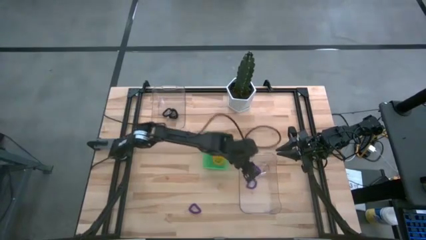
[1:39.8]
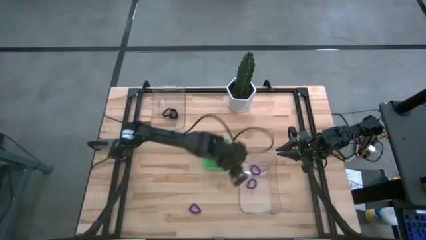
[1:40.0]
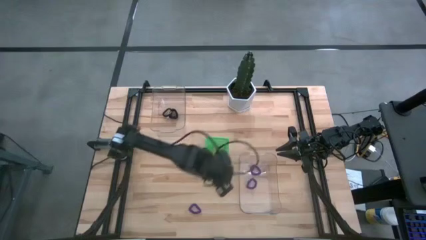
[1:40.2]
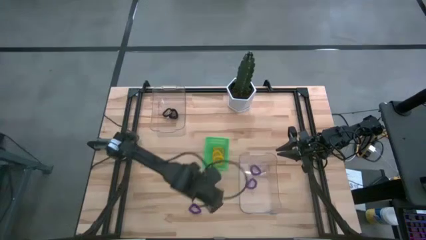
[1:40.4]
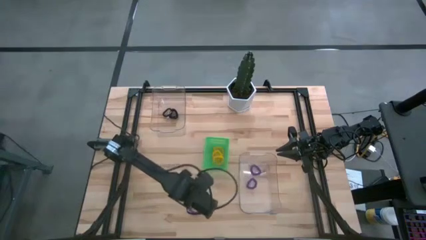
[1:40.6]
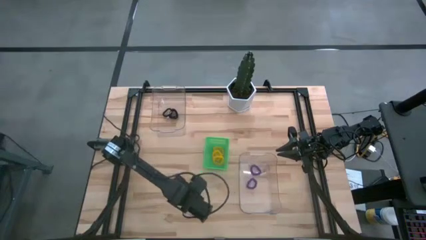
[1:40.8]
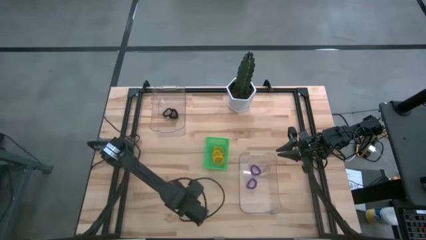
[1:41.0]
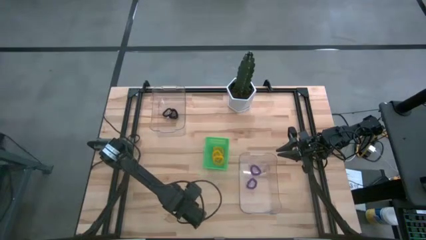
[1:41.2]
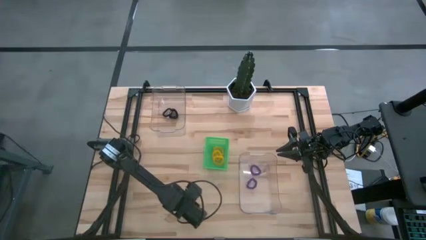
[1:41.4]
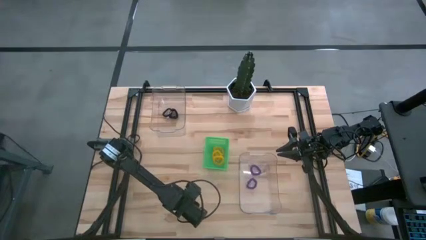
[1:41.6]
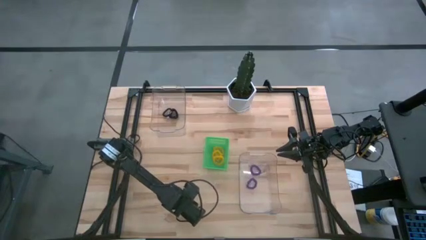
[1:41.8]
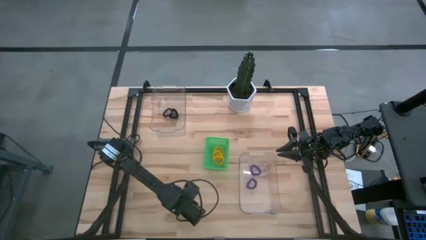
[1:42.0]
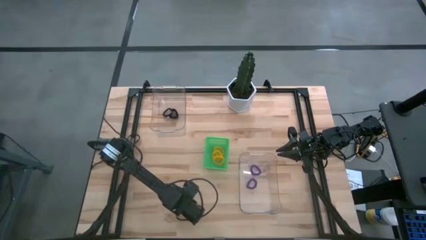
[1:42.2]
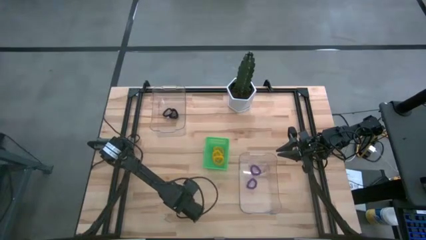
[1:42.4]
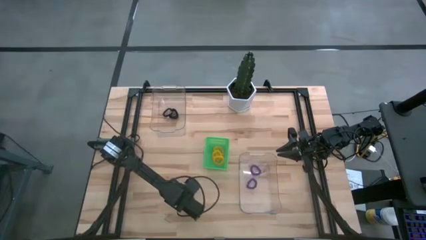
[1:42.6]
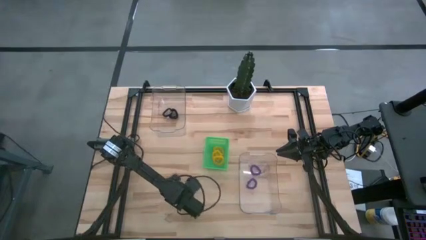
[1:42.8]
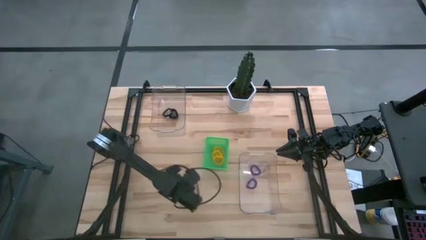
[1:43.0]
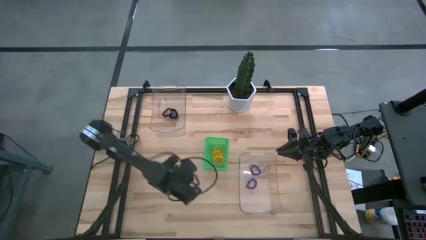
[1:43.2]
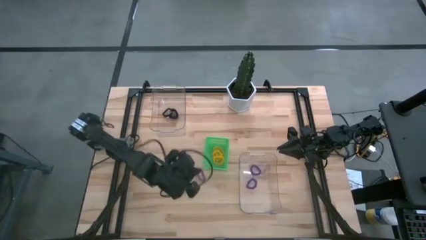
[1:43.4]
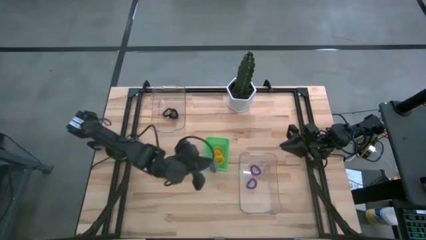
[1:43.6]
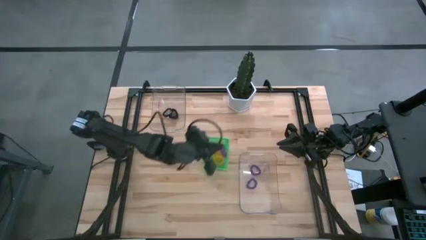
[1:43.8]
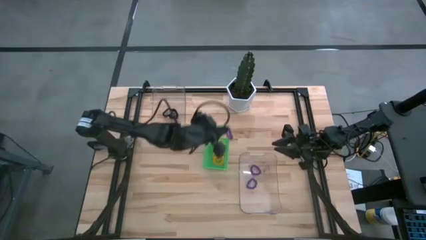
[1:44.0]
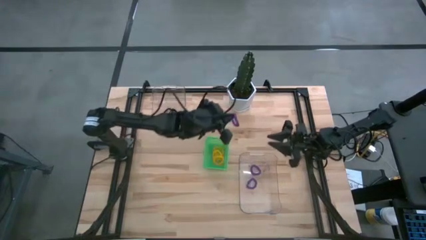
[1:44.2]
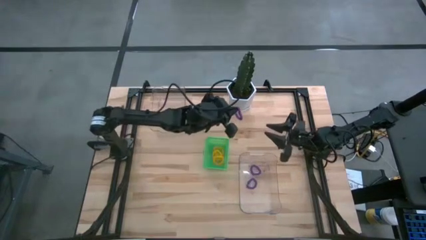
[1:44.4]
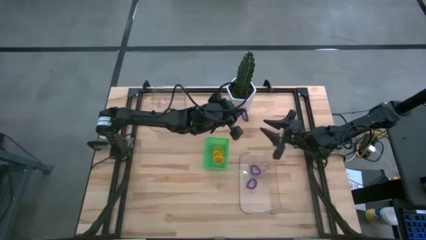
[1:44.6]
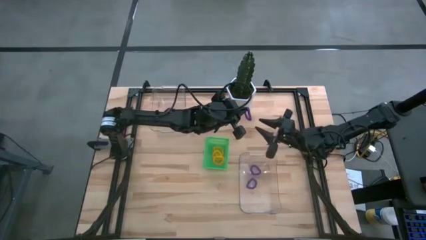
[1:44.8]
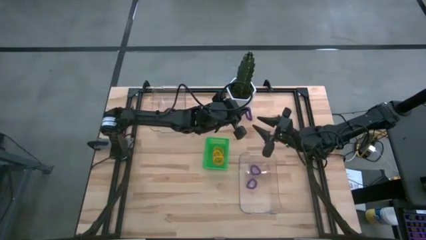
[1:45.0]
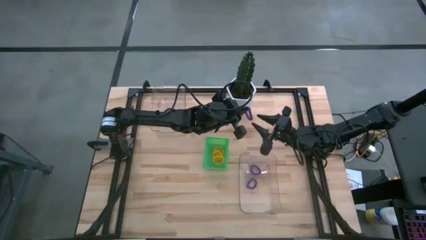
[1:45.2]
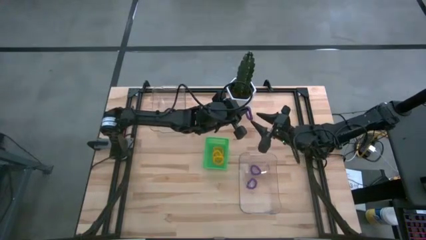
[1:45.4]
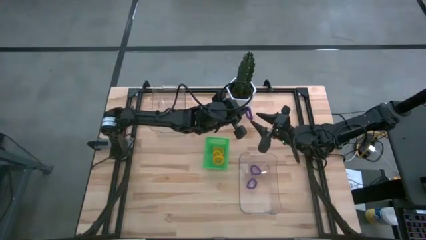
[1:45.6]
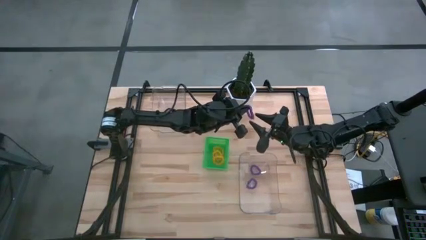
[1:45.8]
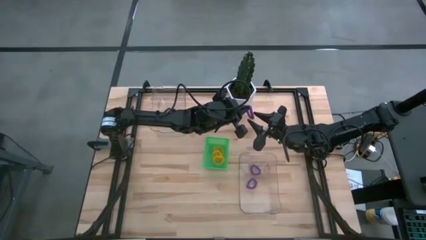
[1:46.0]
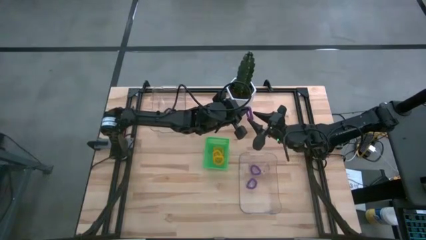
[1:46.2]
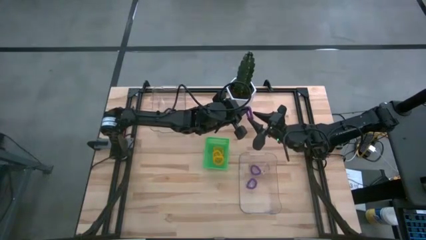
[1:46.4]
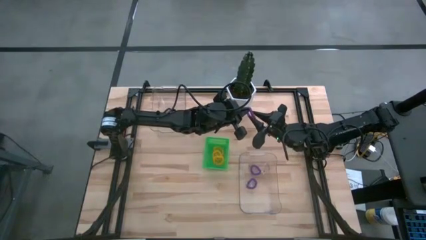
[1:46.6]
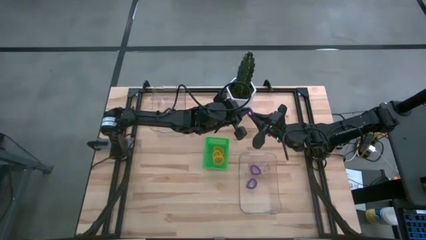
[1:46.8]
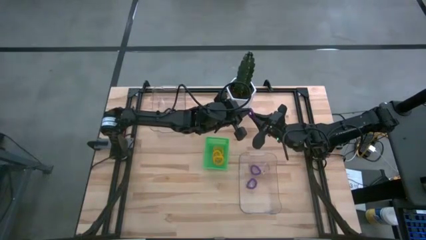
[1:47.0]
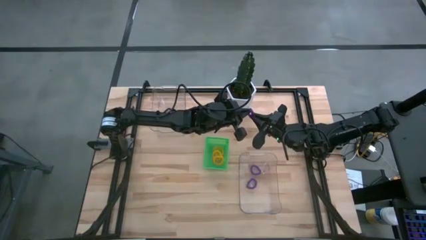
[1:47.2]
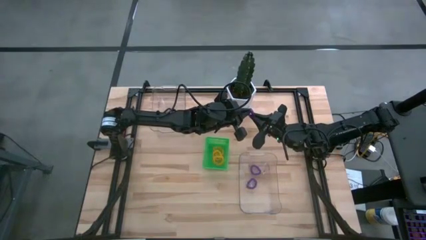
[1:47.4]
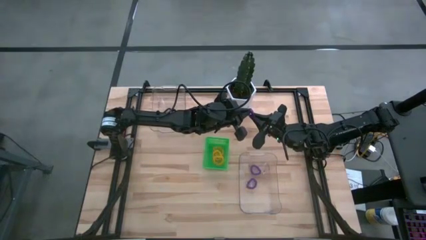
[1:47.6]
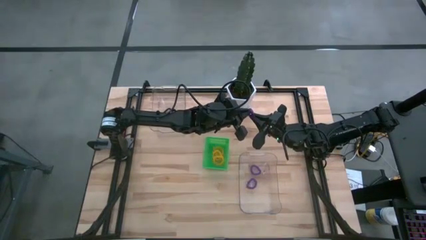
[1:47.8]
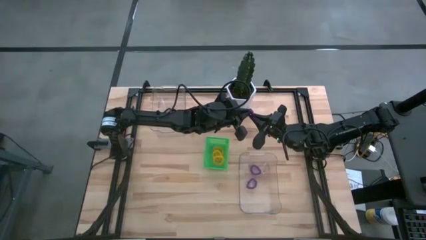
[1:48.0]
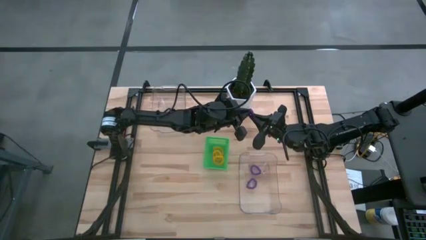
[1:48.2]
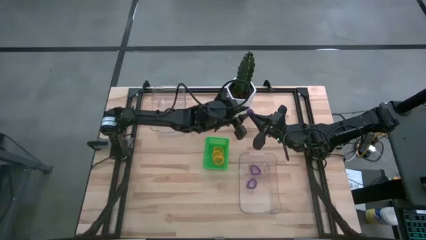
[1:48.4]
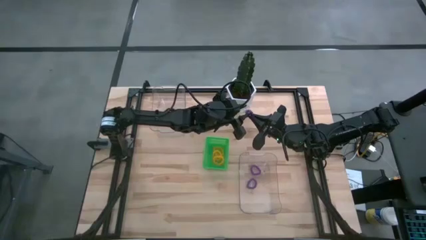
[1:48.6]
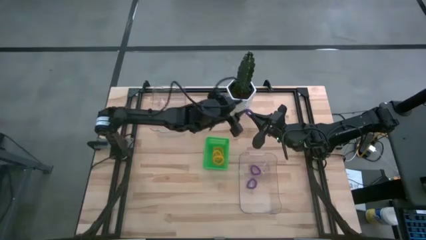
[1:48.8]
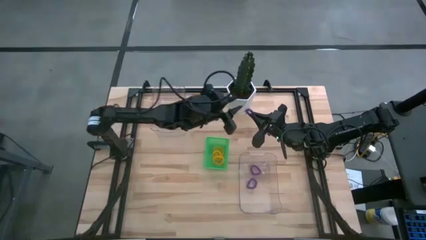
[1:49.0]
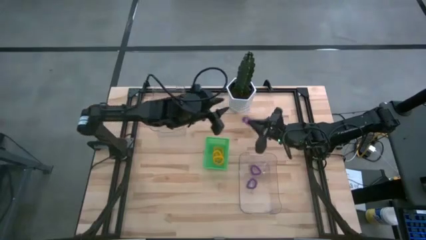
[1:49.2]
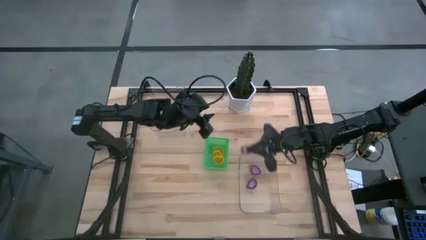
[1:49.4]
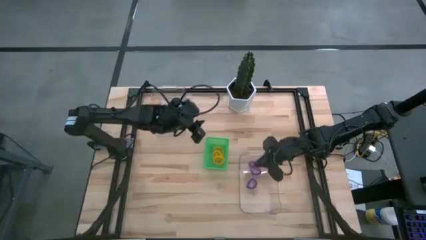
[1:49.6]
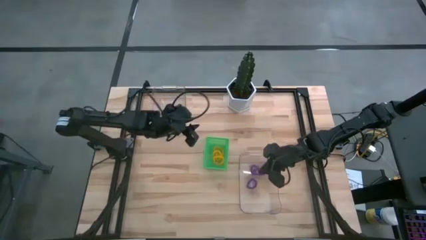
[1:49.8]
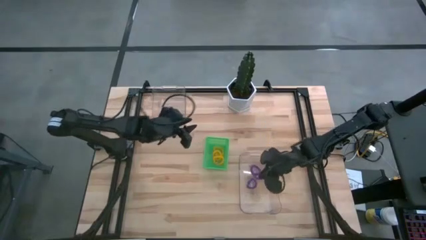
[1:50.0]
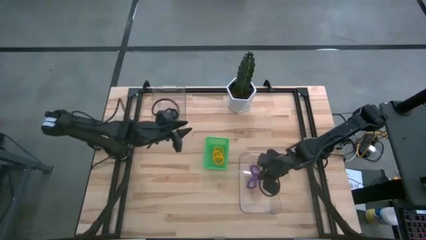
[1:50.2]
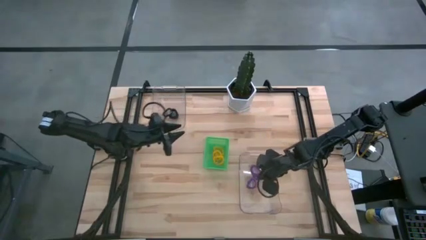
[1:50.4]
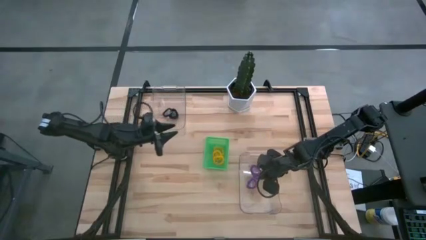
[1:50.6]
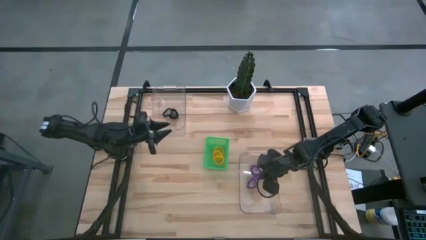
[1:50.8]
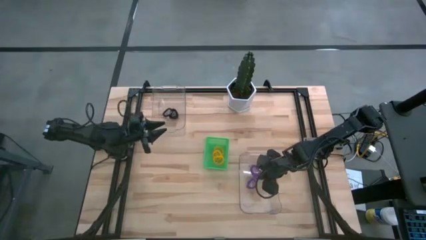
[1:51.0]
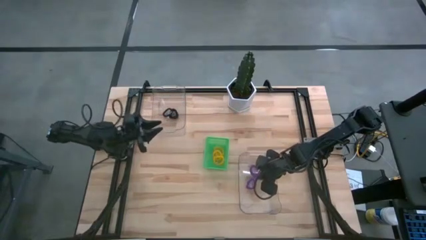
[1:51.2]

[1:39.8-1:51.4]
Task: Sort spring keychains
Put the purple spring keychain into the bottom transparent bin

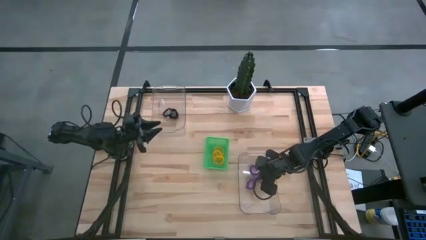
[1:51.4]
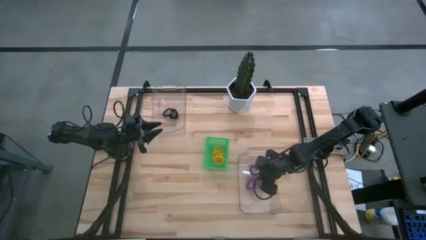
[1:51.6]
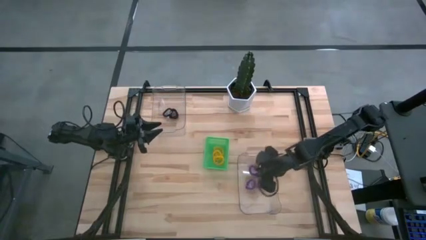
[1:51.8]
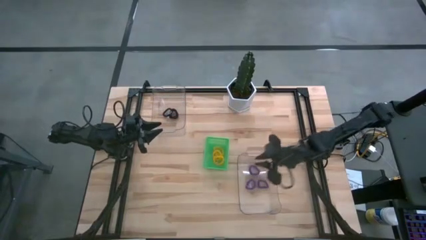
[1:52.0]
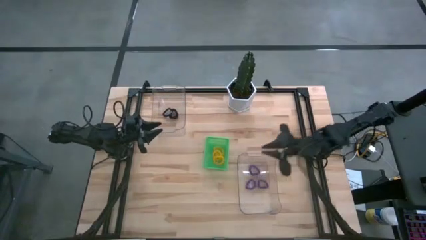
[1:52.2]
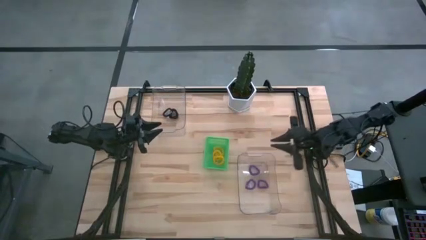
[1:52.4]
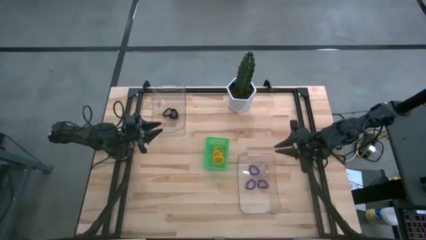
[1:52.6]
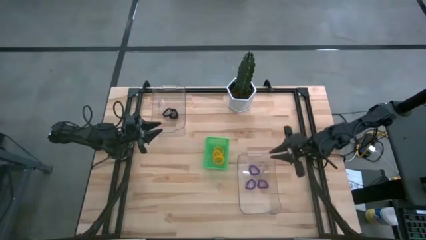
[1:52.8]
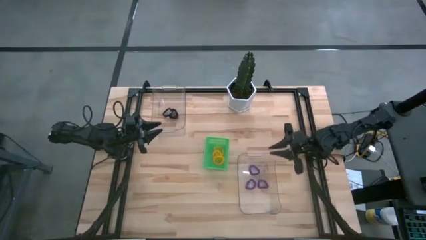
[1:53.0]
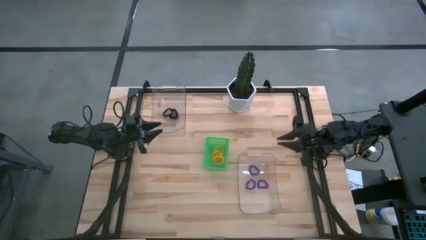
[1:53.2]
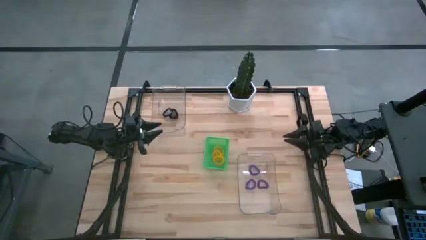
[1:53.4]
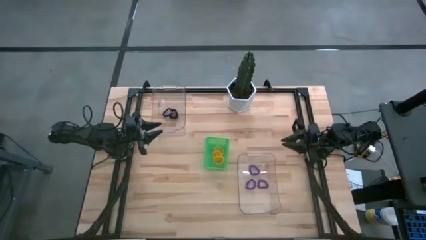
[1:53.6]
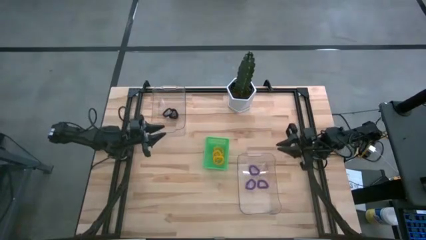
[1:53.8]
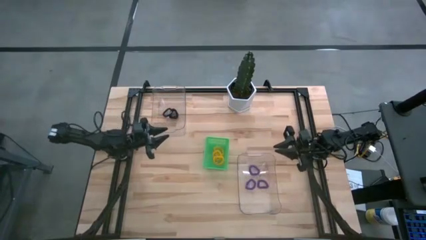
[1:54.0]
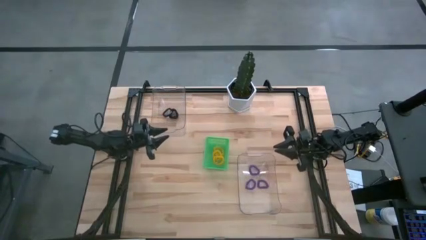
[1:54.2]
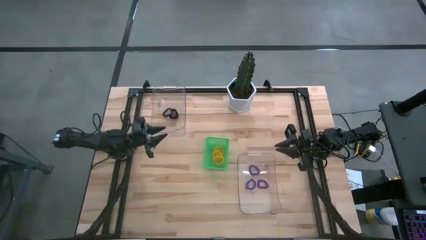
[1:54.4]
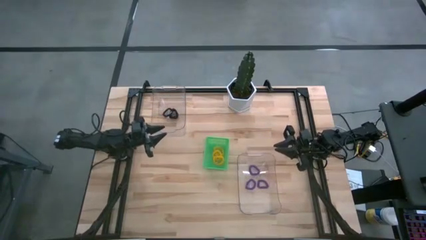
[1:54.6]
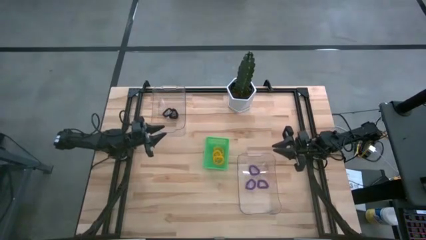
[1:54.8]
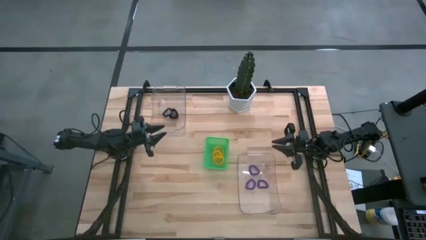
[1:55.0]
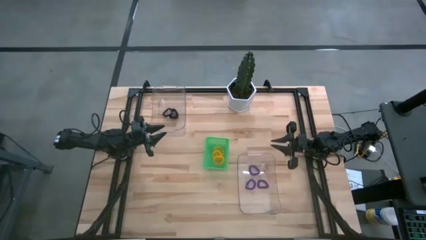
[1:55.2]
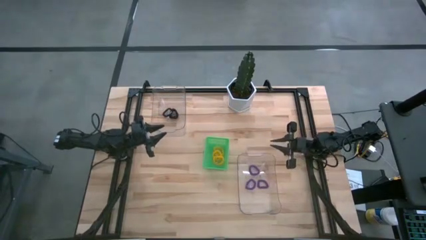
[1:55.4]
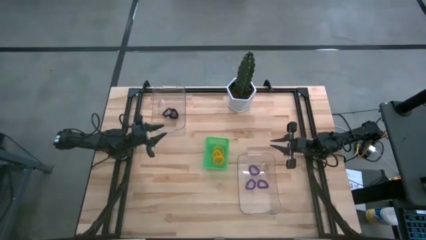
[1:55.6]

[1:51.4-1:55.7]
Return to Home Position
